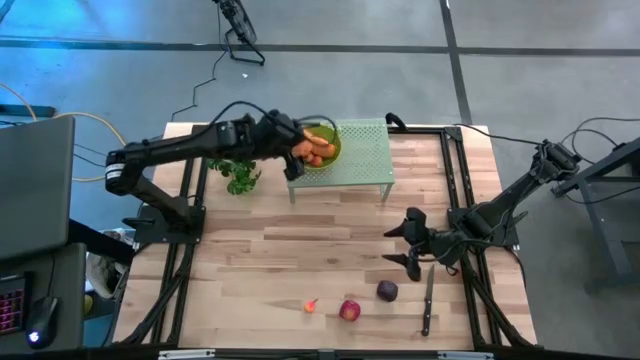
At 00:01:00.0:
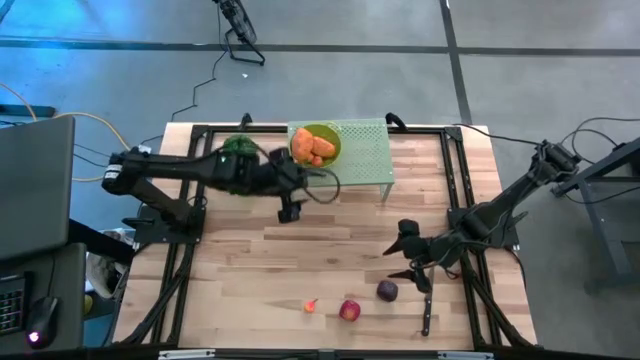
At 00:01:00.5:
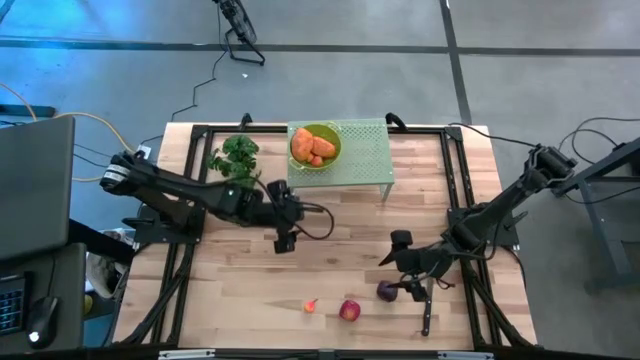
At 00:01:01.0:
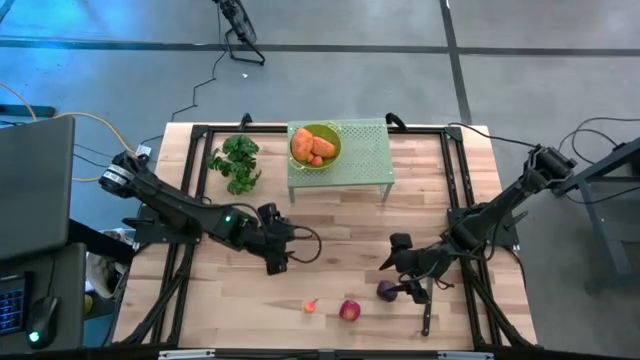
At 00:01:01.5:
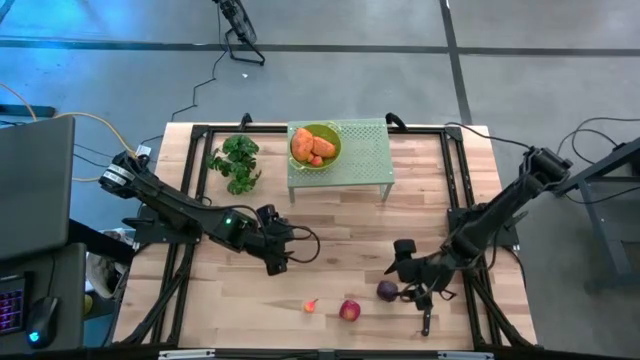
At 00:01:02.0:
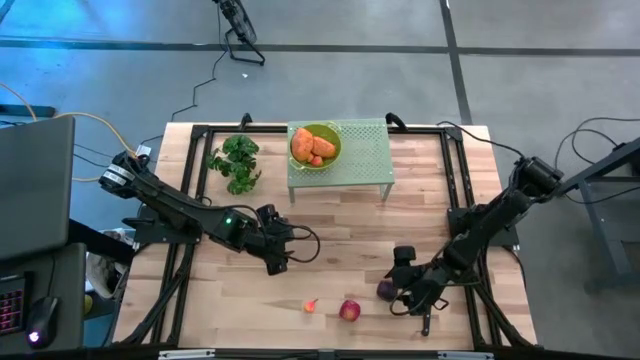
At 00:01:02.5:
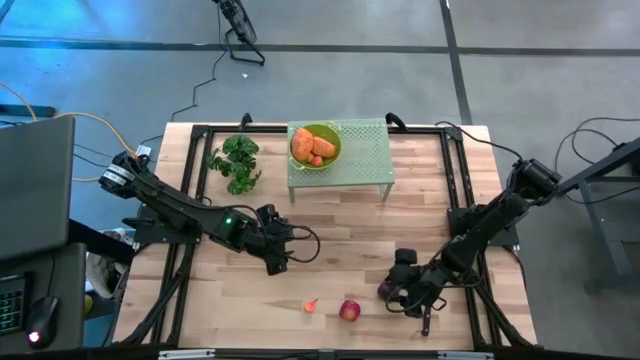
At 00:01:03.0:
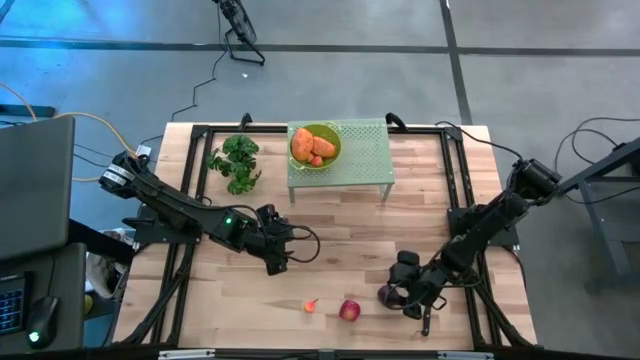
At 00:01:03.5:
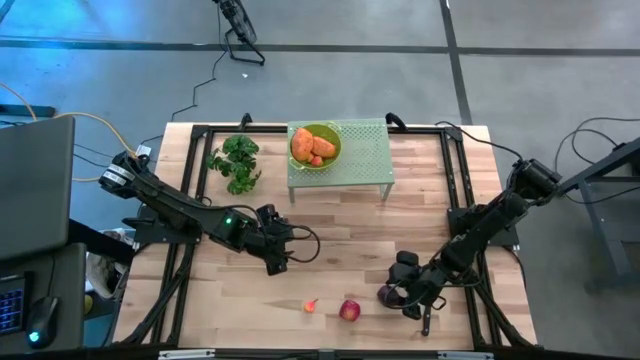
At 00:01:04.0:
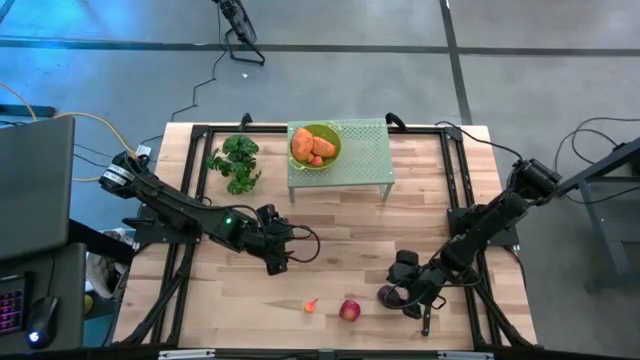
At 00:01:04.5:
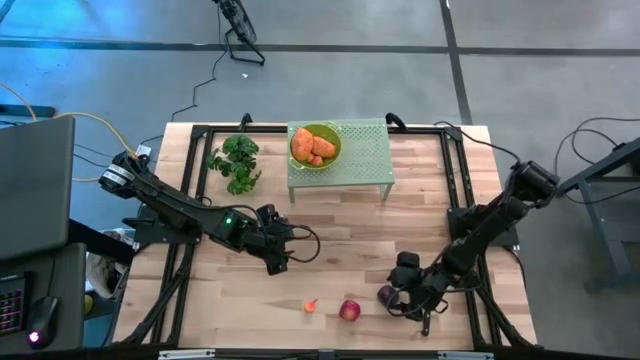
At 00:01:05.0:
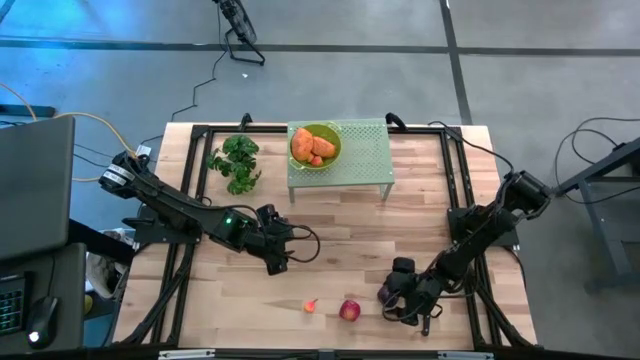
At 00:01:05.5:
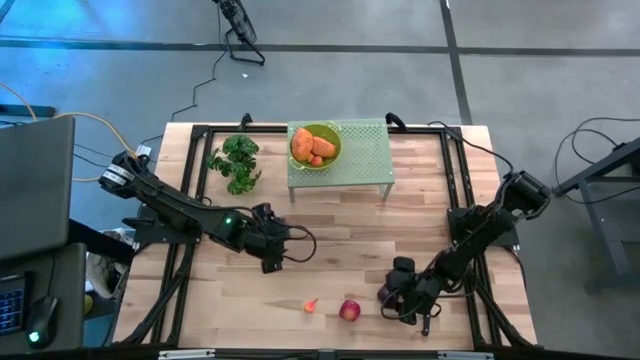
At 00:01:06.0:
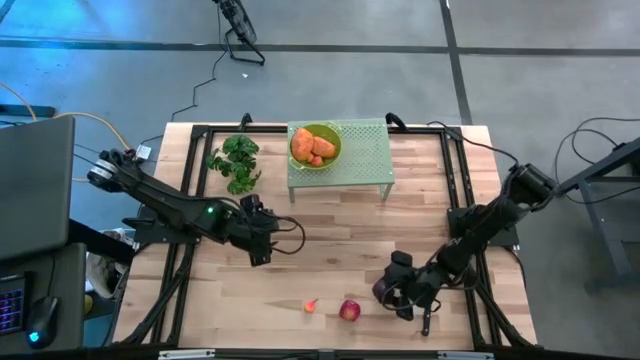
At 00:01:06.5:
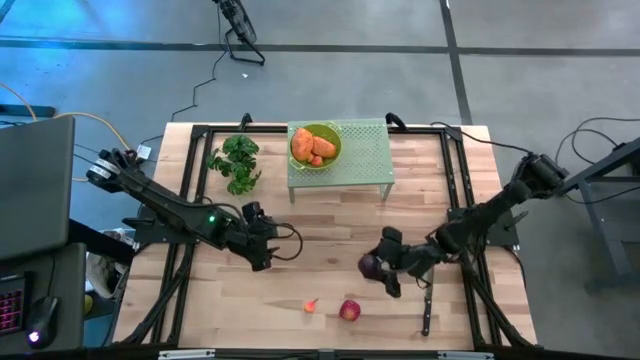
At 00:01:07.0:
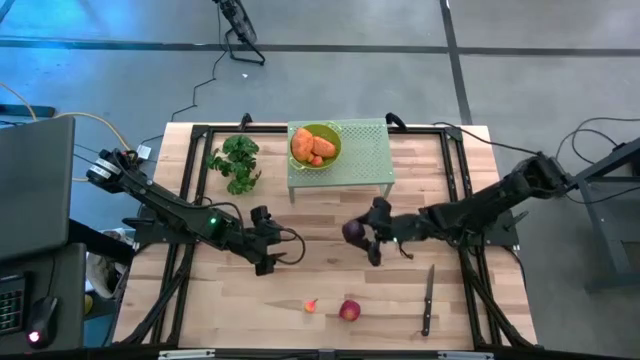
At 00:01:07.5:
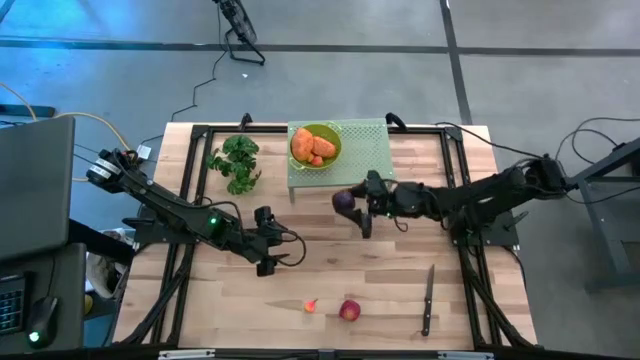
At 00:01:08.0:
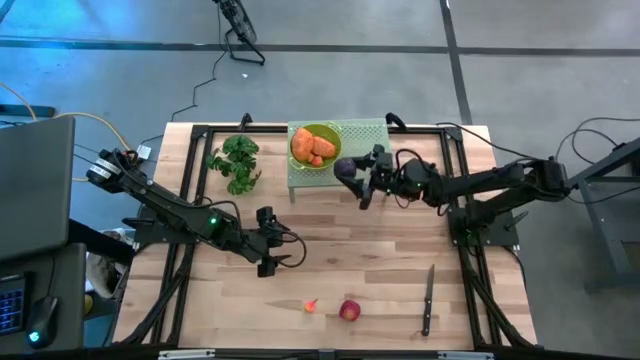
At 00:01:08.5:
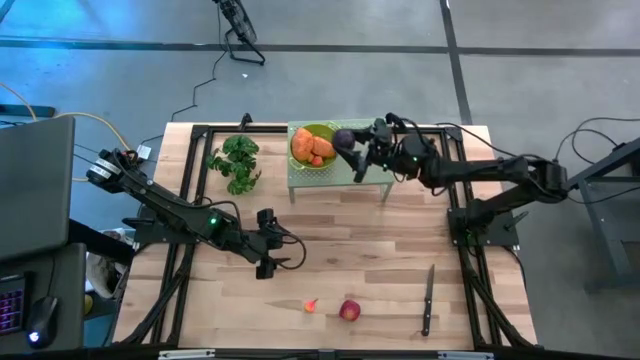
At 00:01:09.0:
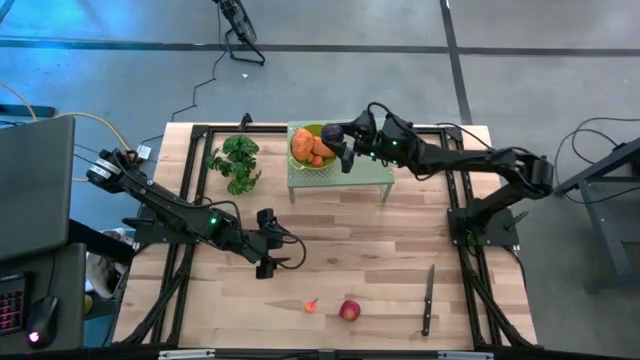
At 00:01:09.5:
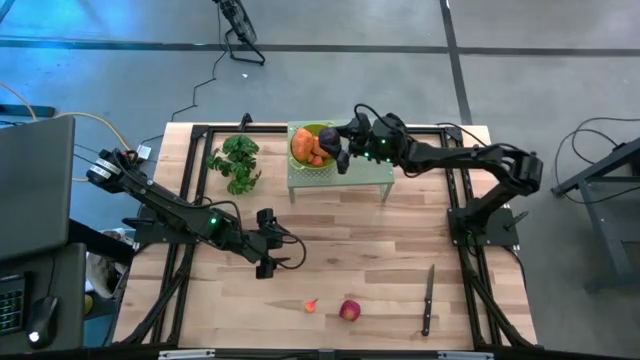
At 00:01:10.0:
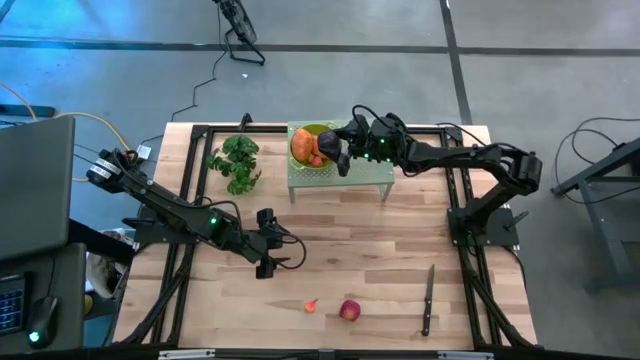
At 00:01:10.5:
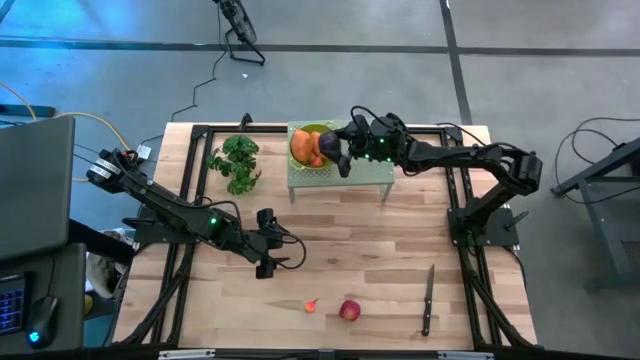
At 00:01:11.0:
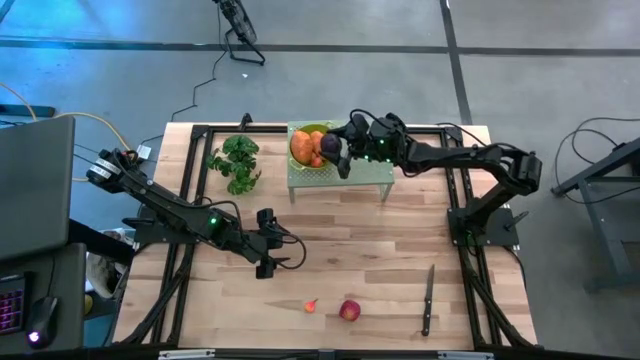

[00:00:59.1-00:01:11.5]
Task: Pick & Place Fruit
Put the purple plum into the green strainer bowl on the shelf

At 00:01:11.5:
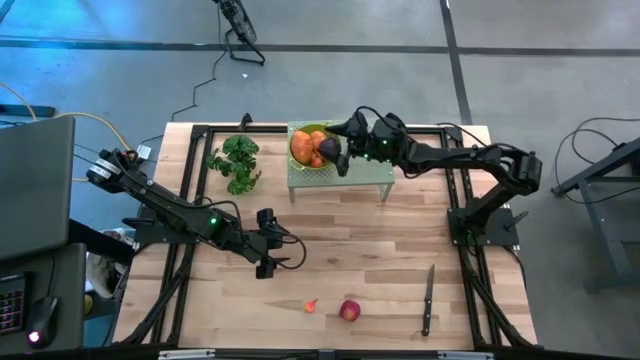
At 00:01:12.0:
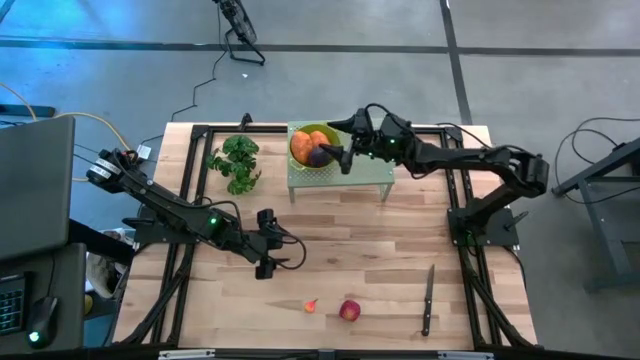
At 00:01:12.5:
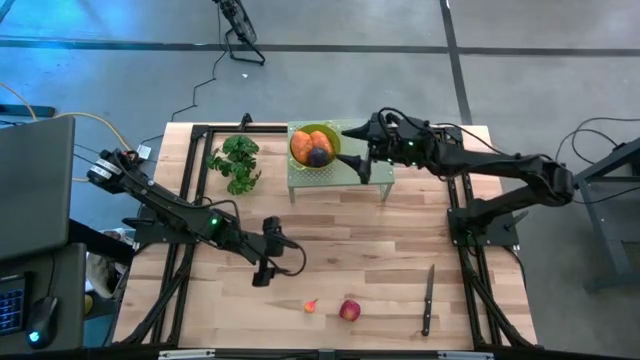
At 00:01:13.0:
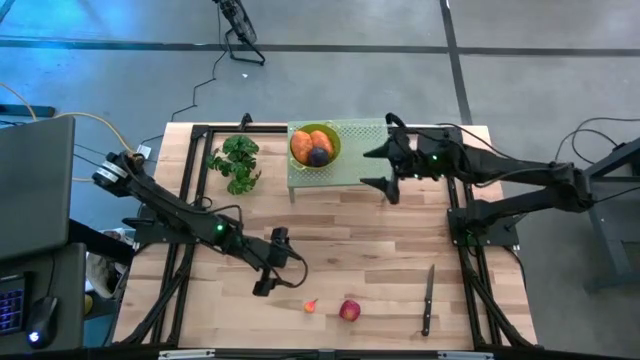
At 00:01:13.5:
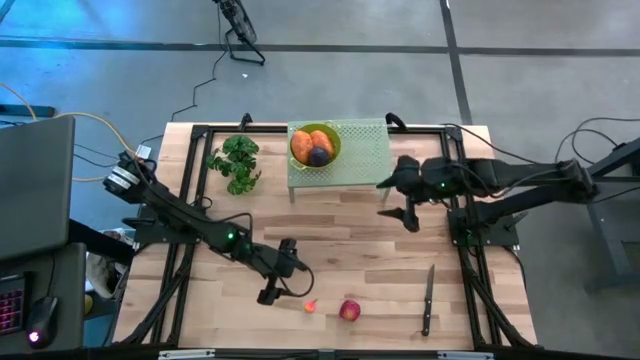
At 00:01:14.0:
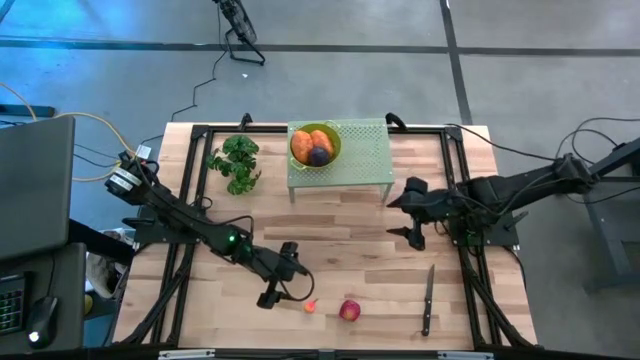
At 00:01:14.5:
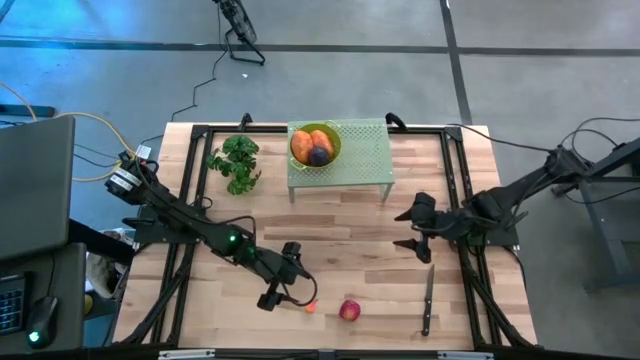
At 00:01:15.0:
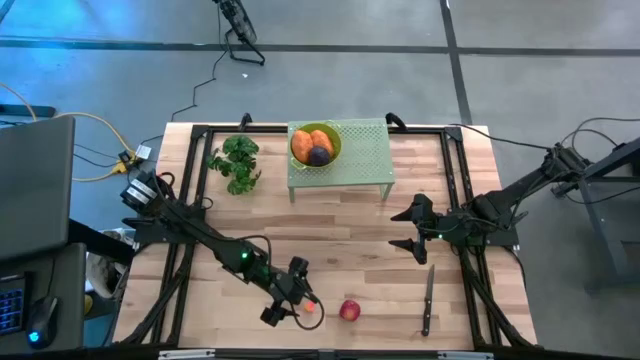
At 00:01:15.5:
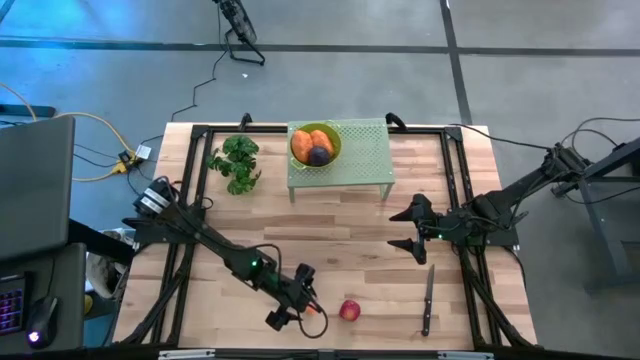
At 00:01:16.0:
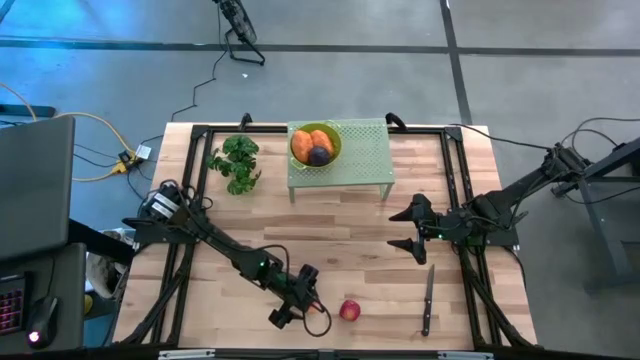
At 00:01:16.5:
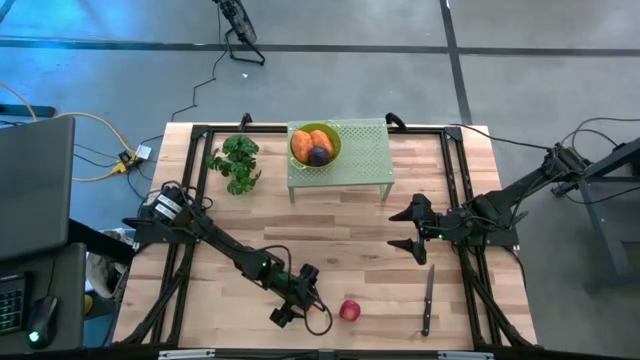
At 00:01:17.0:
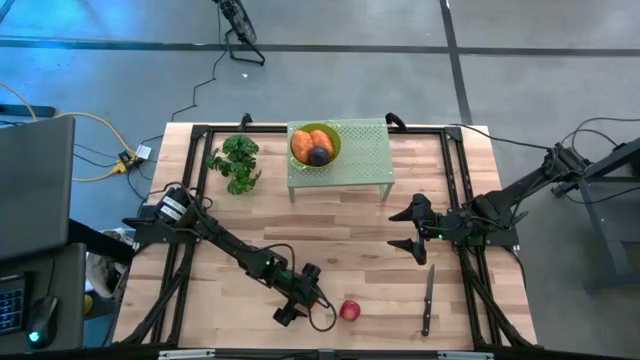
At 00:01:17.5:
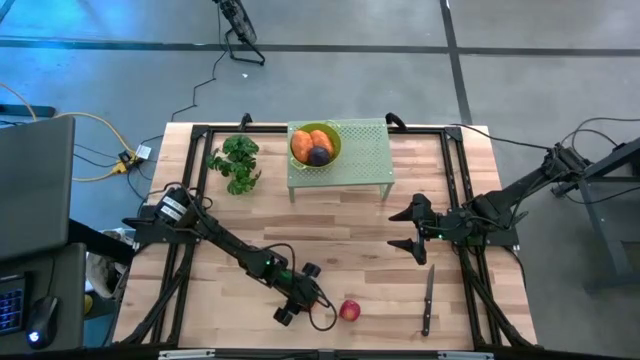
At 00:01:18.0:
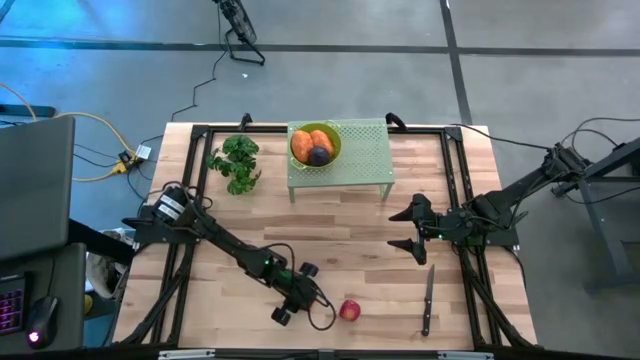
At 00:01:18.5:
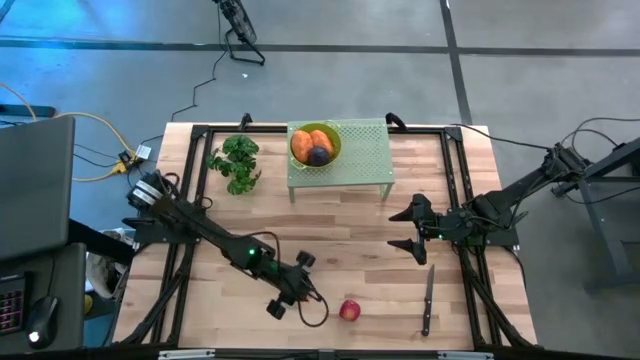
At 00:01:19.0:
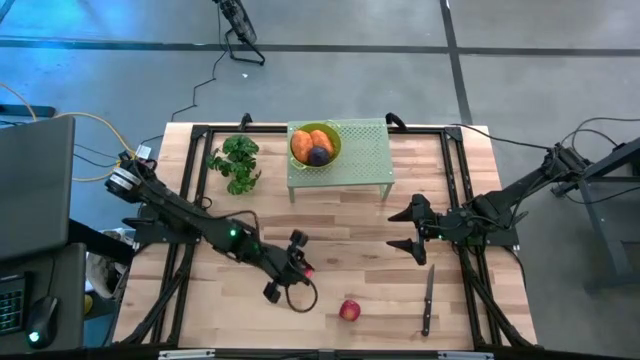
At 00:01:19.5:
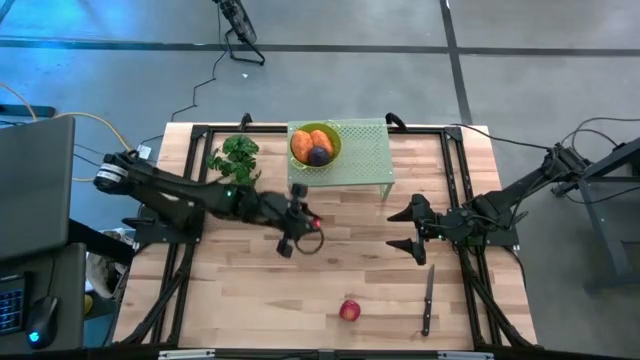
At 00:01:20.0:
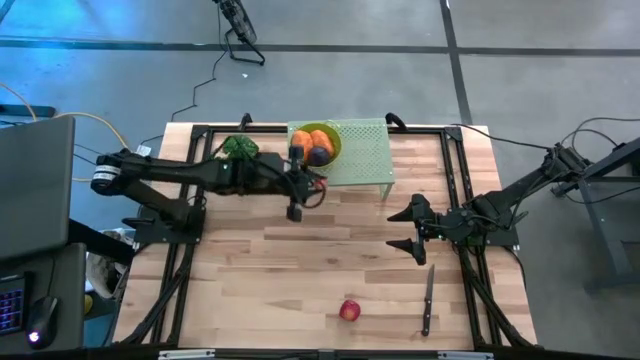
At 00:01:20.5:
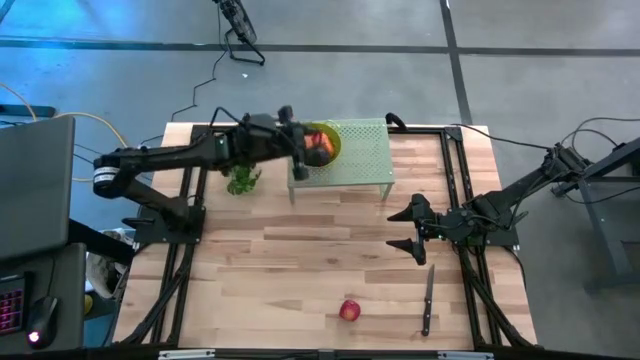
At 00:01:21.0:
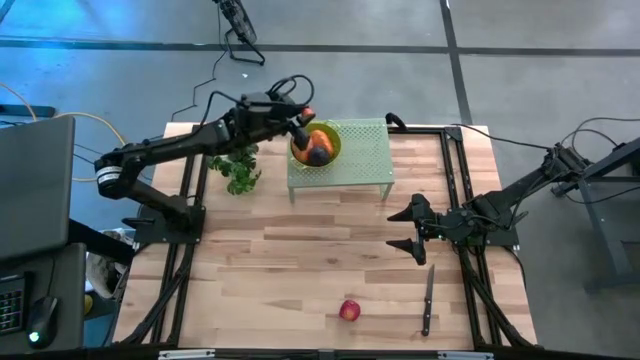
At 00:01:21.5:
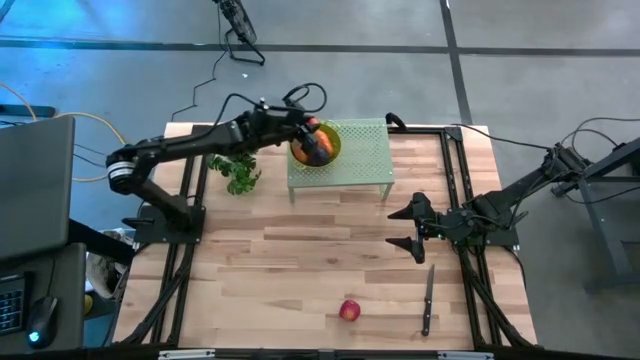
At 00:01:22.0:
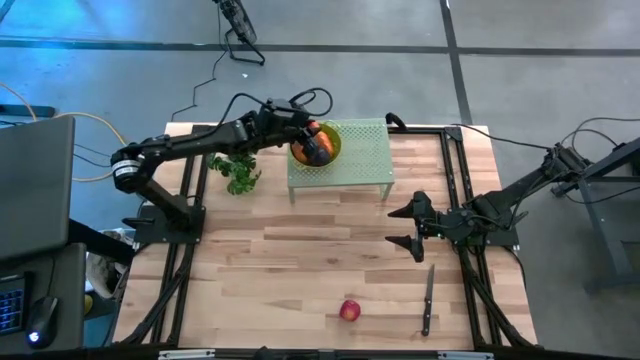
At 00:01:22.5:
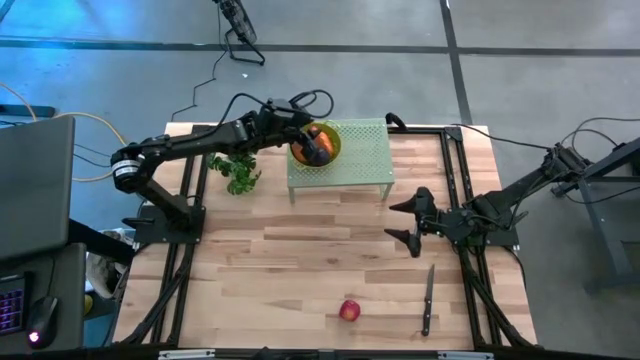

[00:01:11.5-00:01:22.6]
Put the orange pear into the green strainer bowl on the shelf
